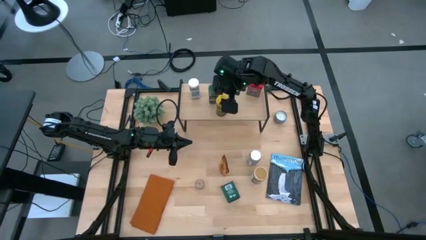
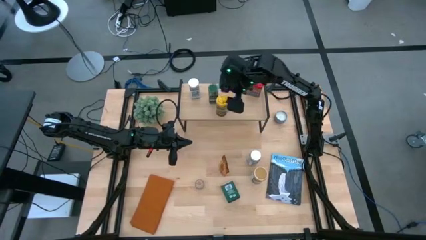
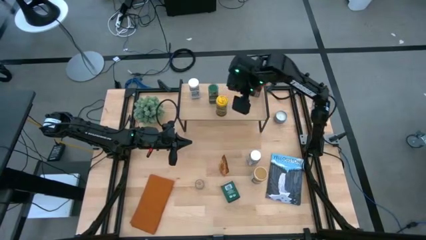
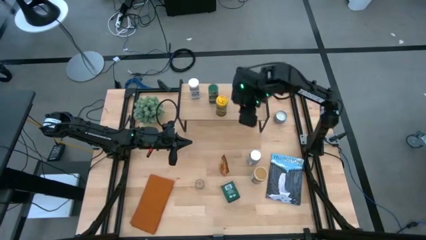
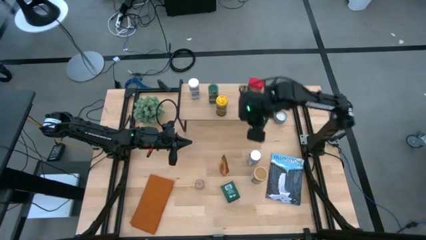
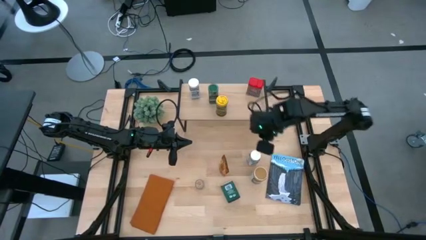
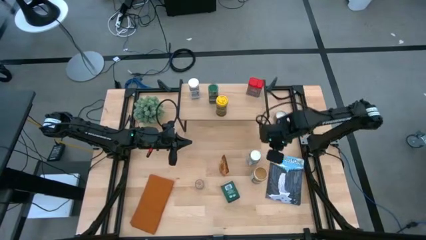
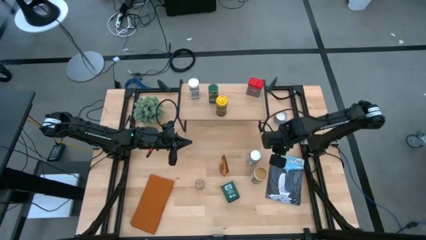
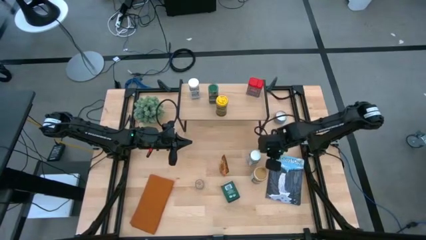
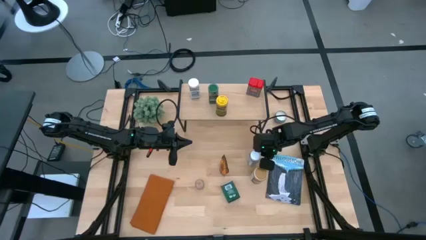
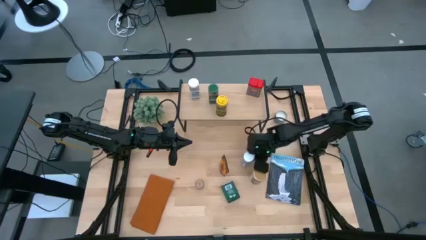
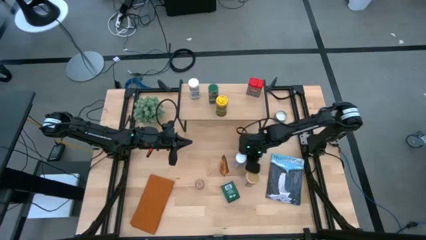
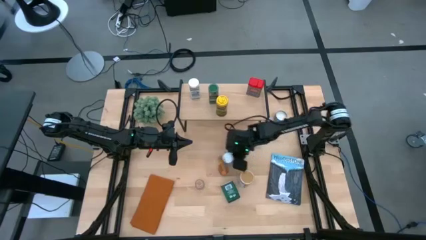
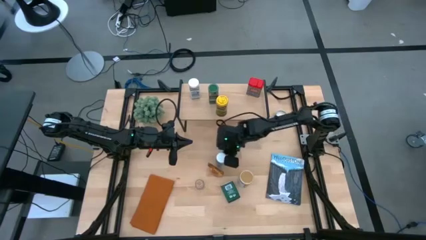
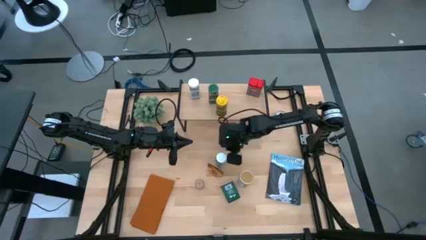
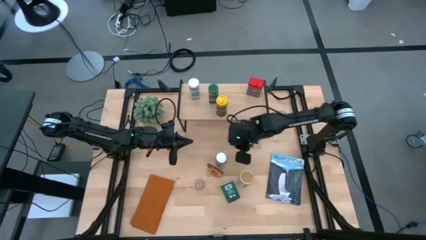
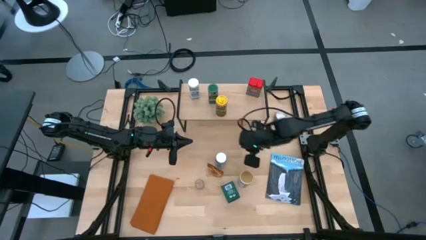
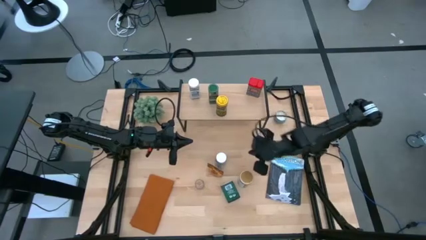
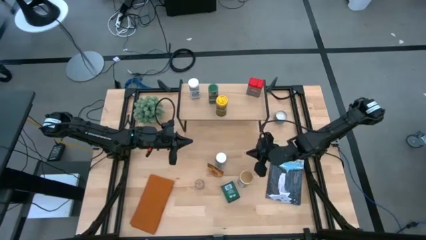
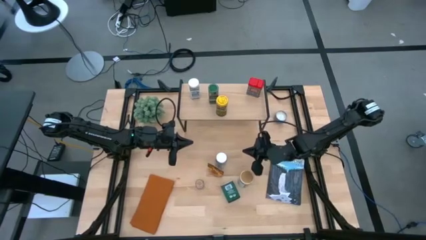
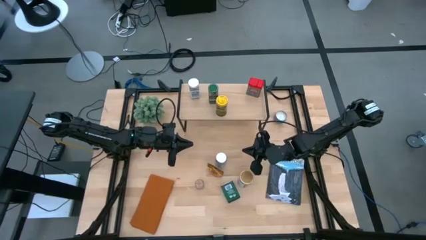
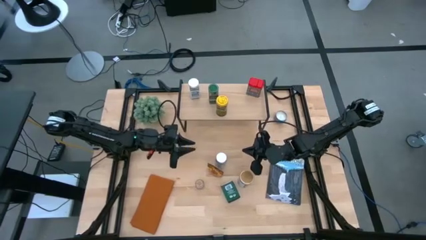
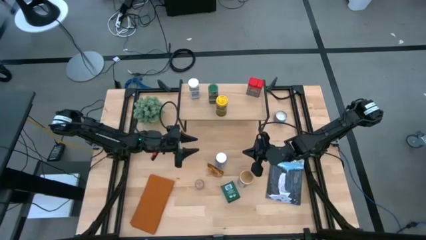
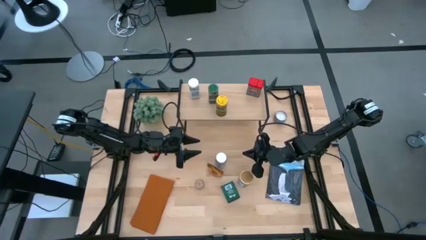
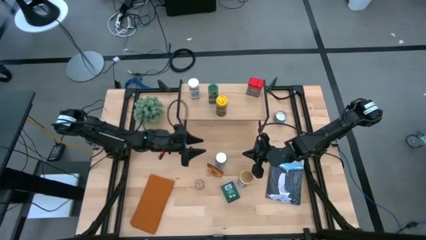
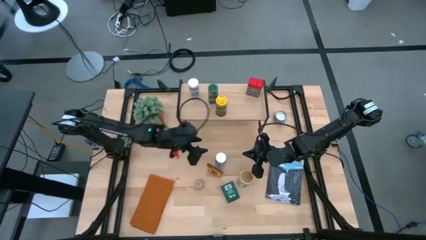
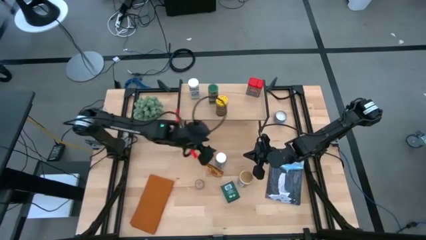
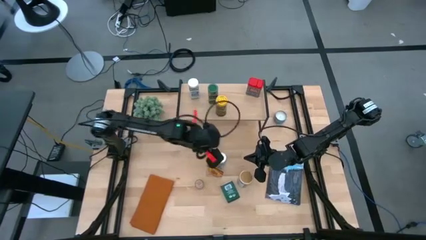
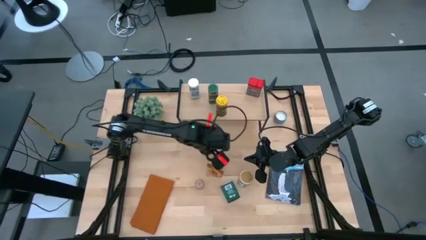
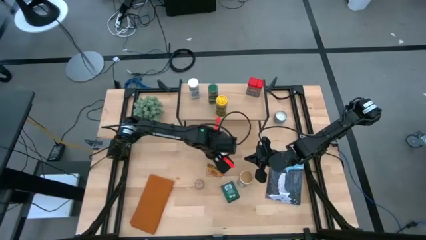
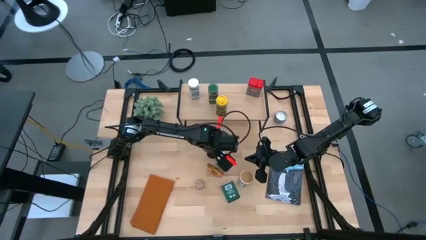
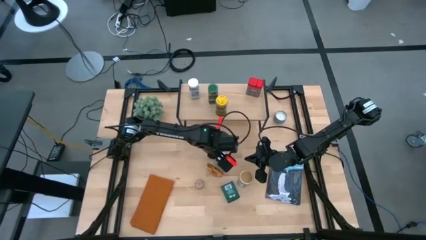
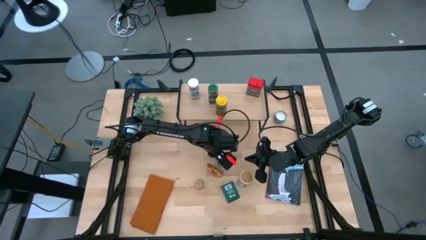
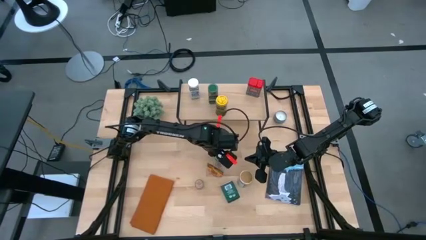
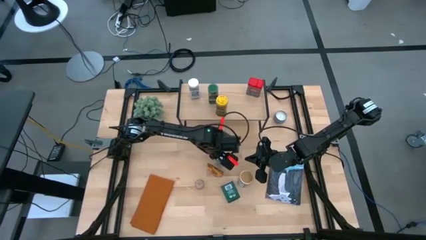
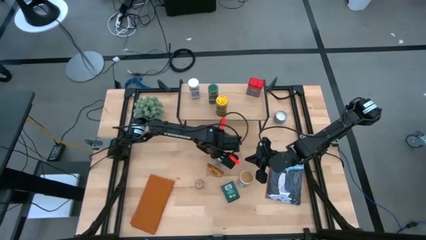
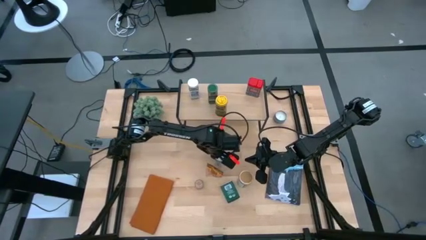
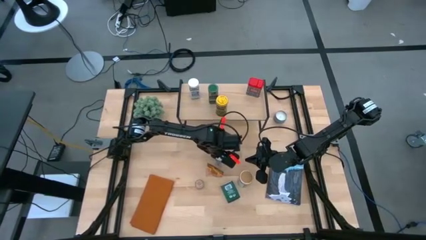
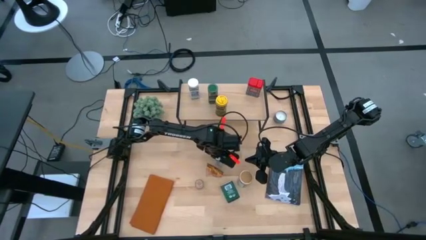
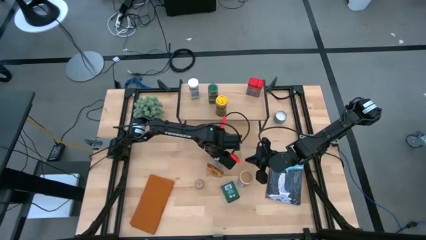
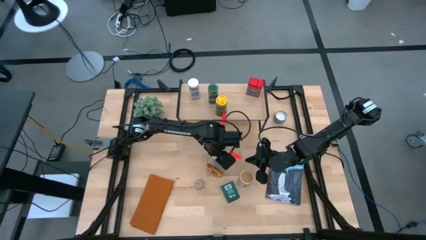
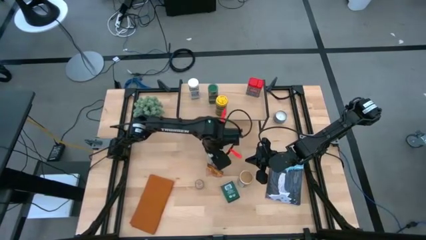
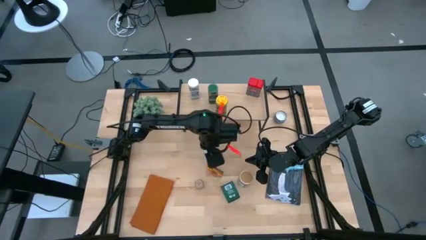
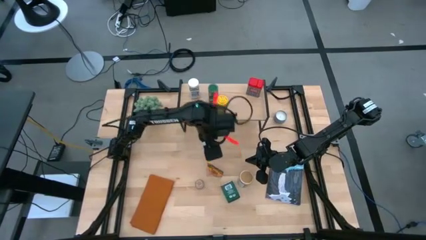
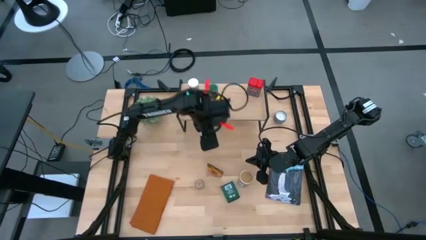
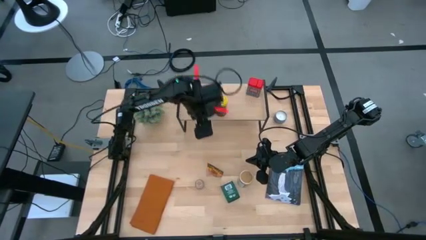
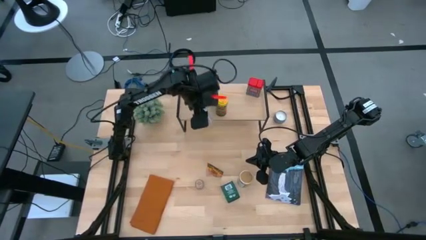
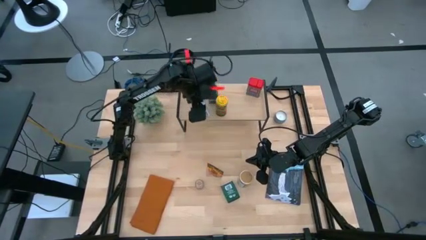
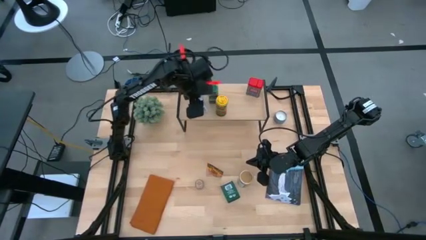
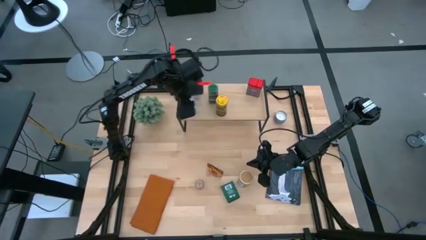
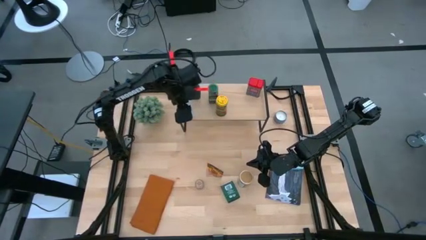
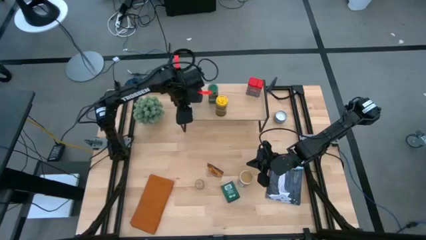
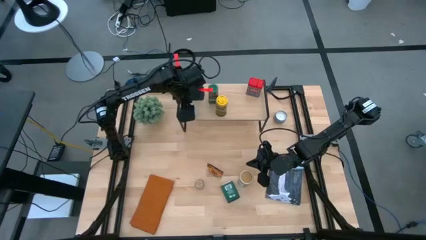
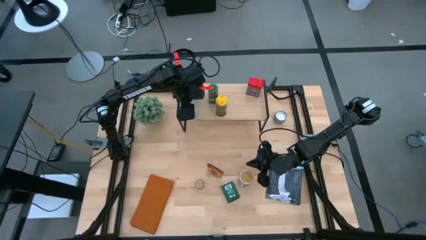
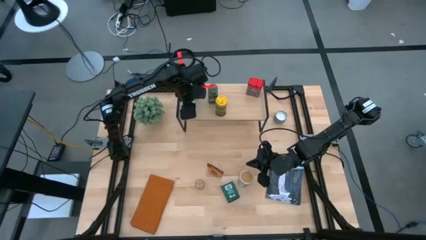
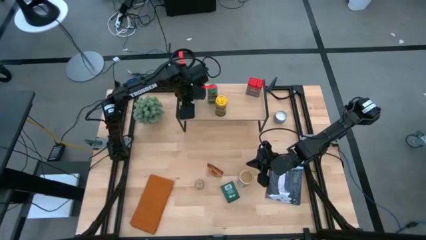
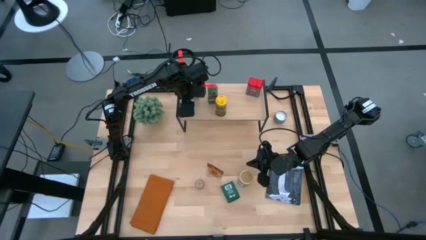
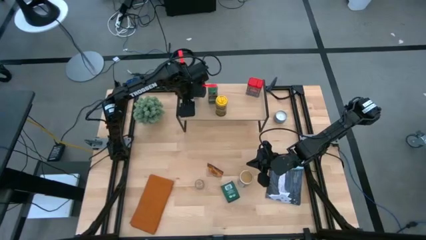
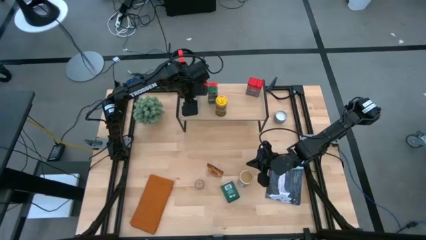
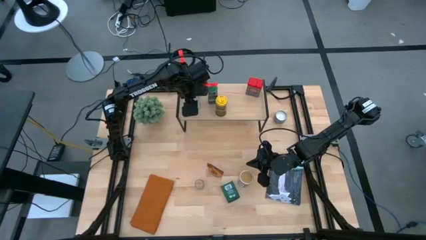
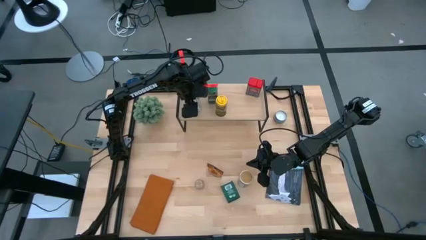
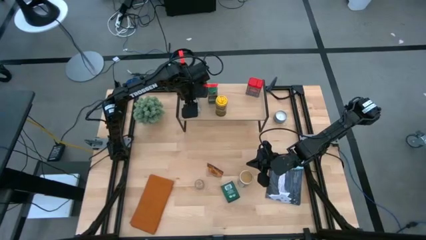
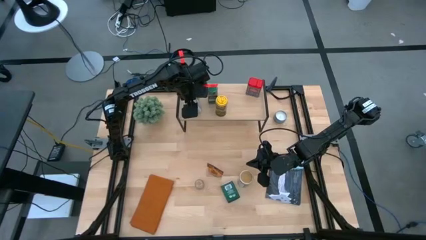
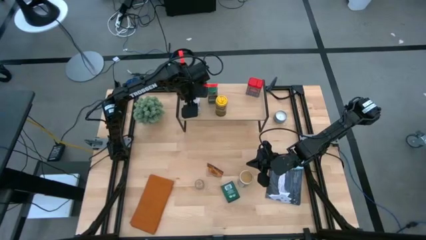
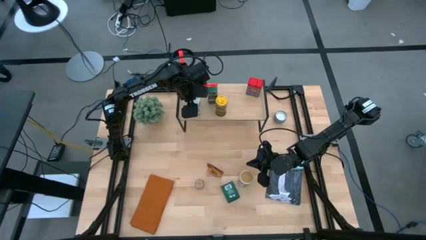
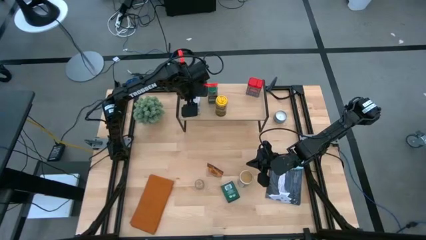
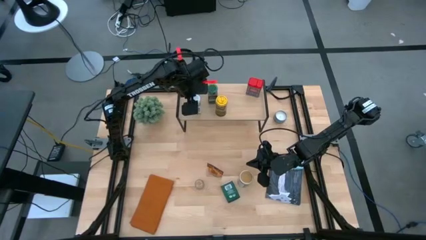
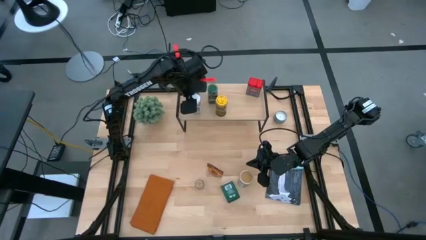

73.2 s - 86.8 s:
Task: Shelf spices
Put the white seasoning bottle on the shelf
